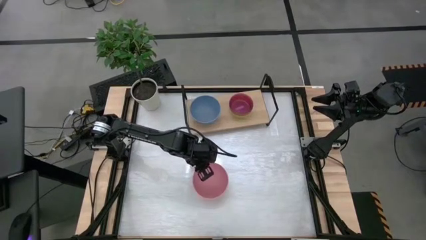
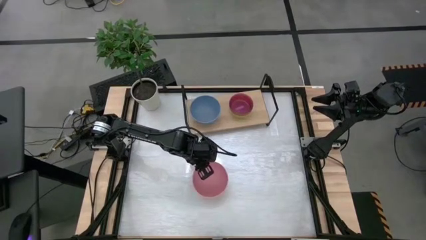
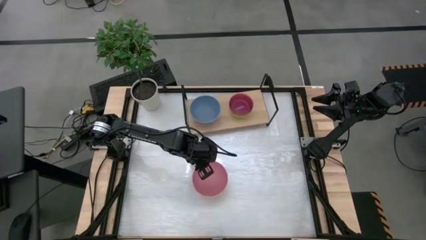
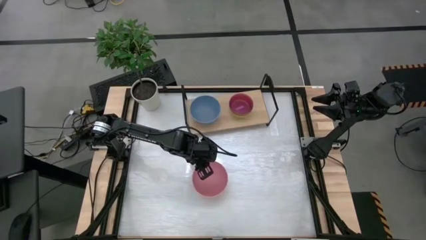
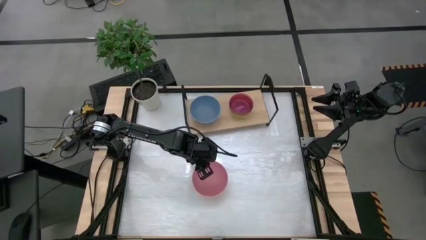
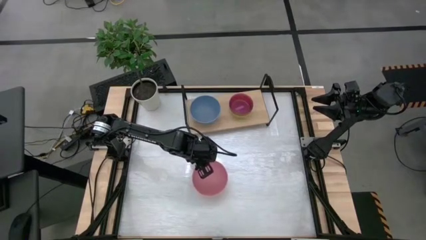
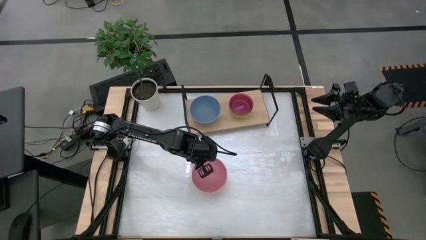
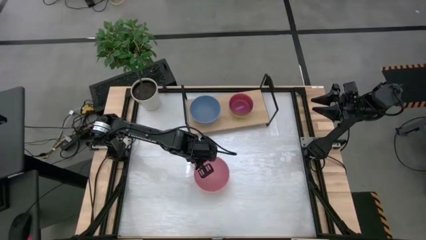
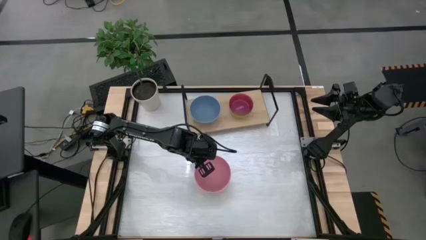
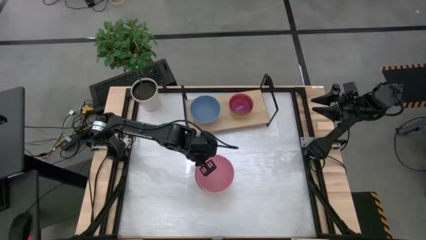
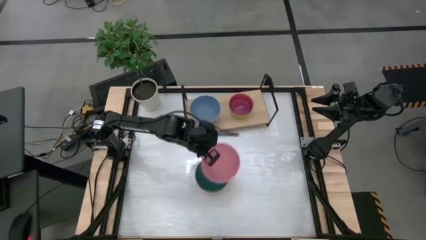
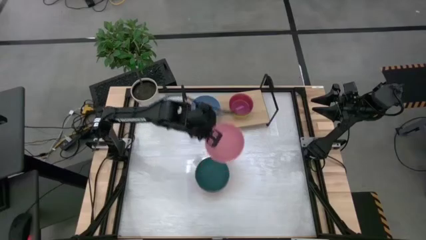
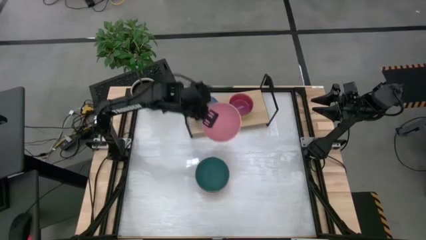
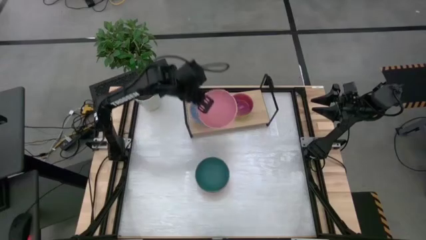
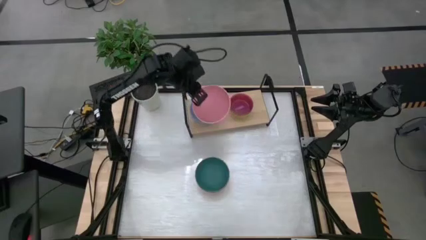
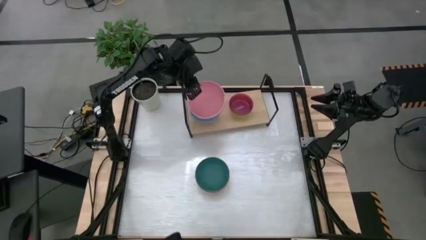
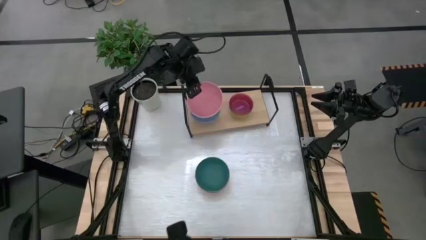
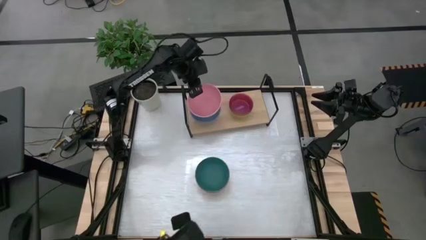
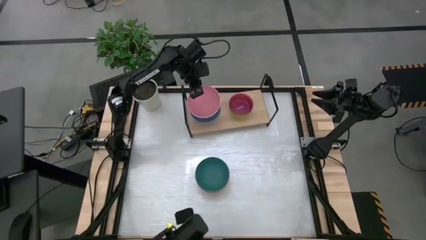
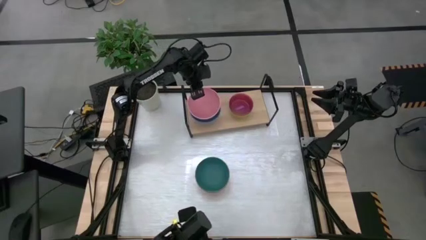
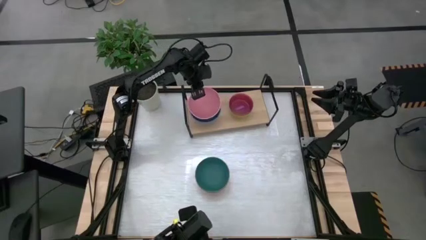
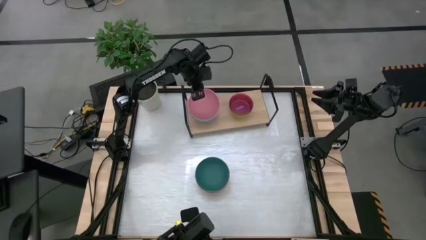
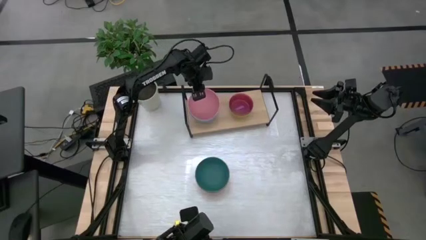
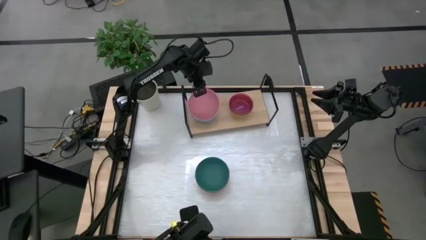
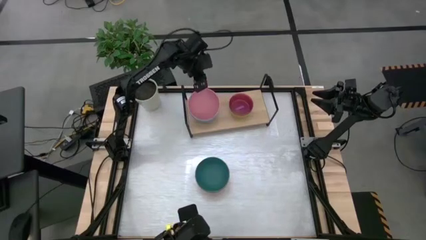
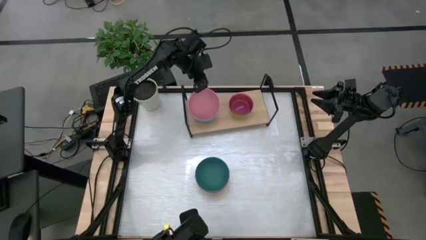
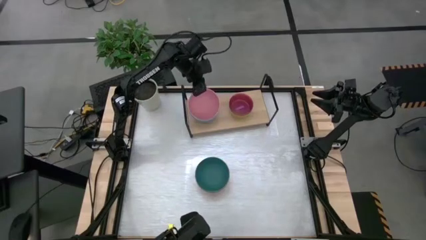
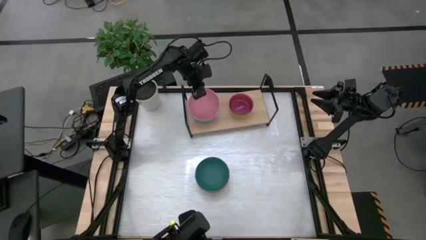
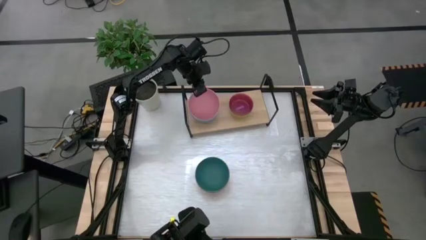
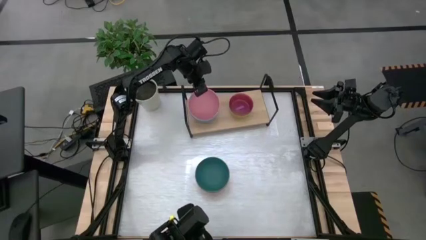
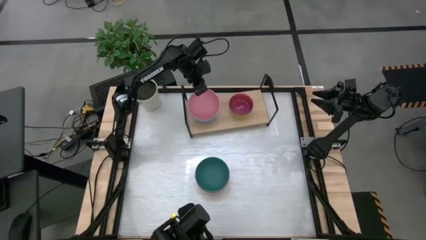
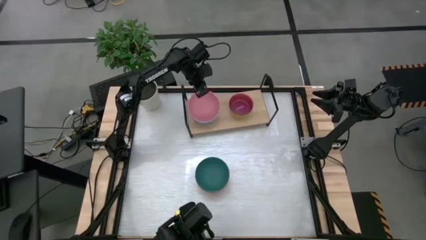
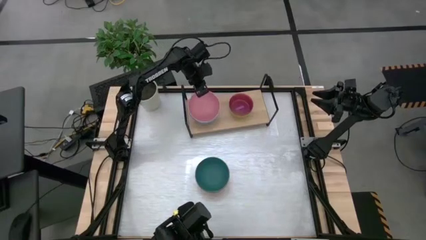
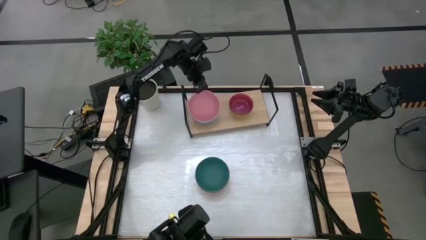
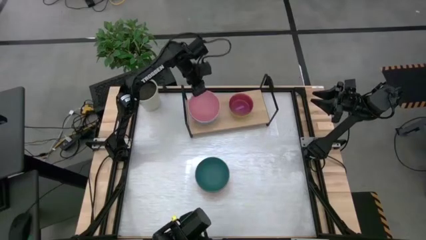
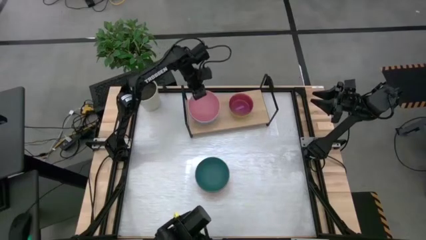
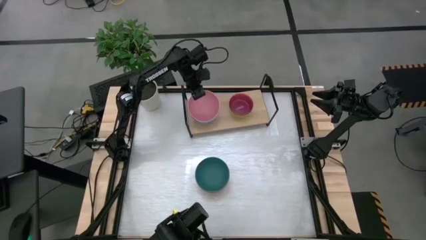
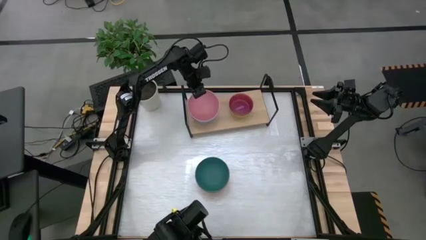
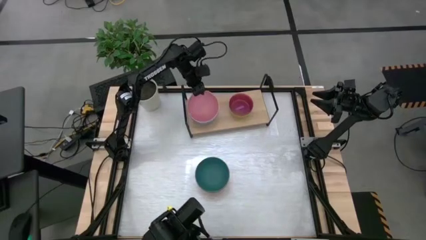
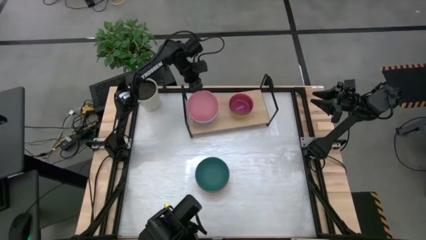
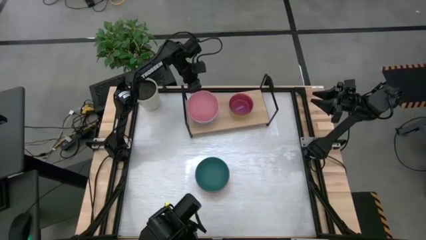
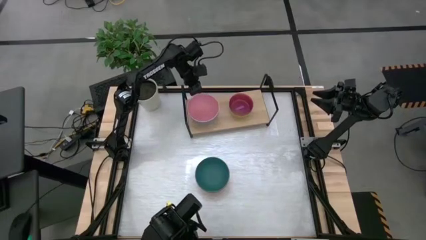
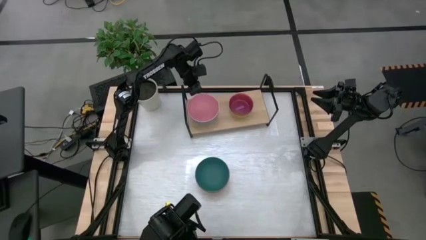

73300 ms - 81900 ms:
Task: Place and stack bowls onto a shelf
Stack the big pink bowl on top of the big blue bowl on the shelf

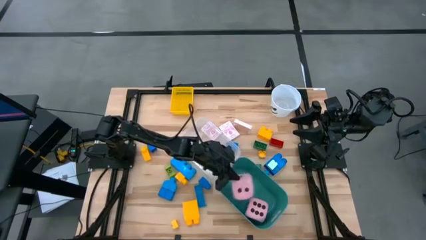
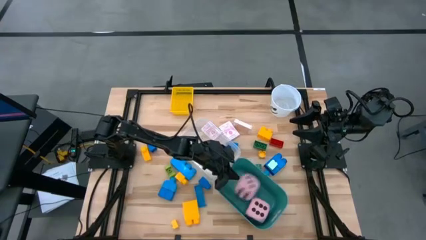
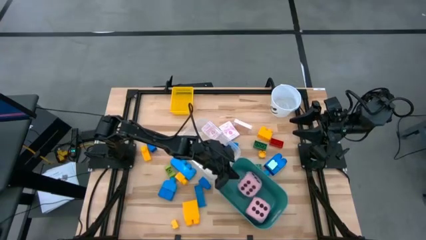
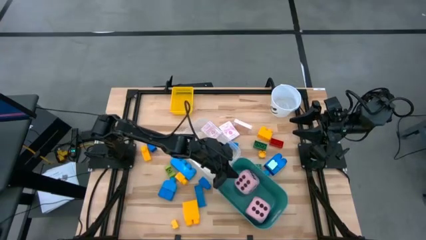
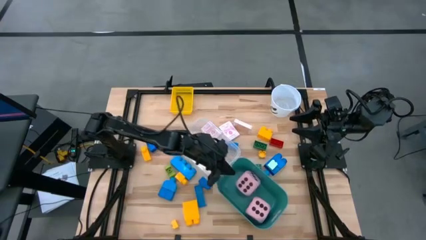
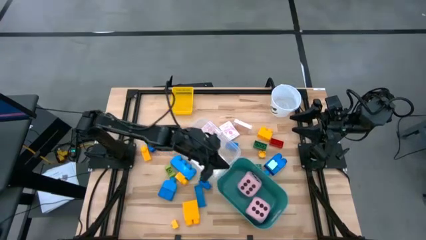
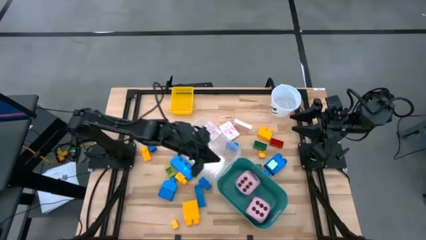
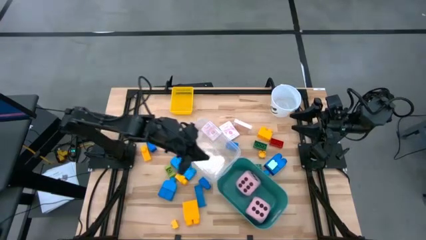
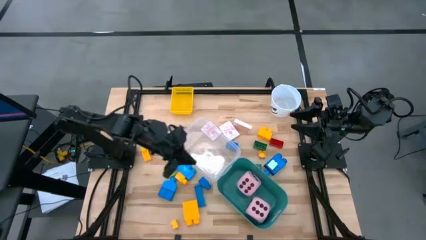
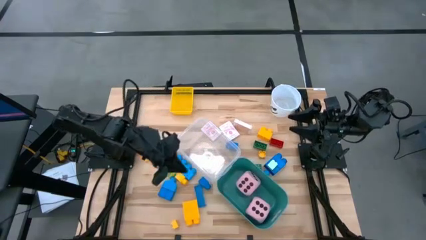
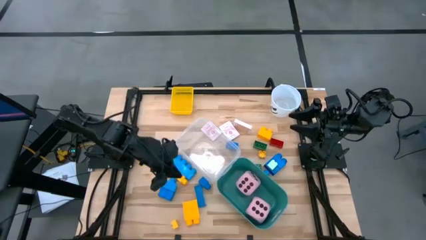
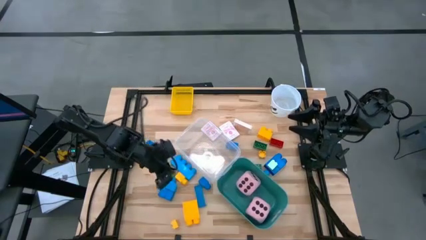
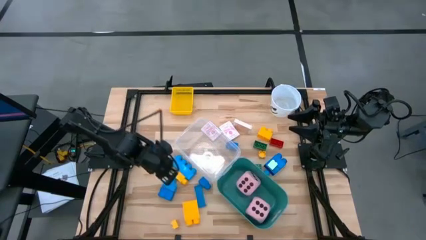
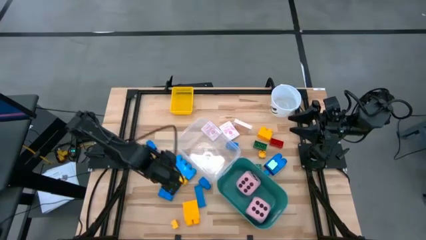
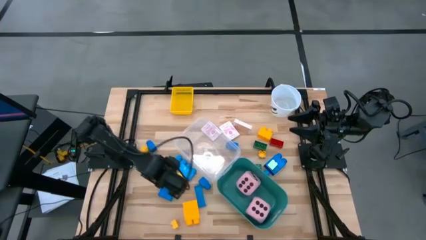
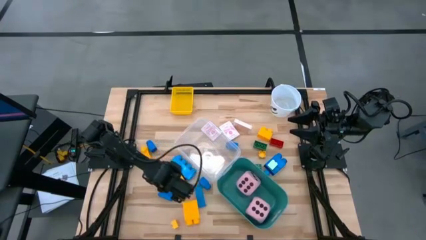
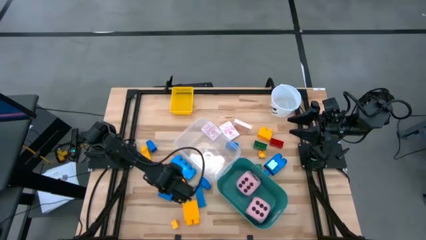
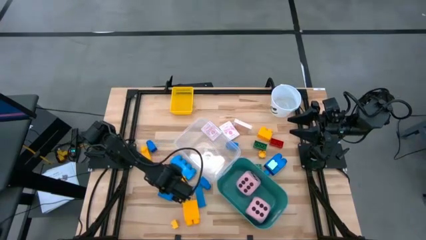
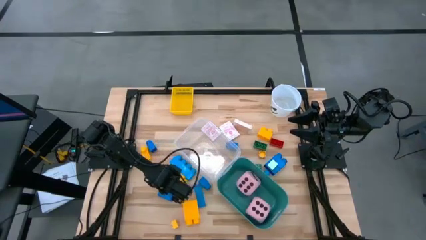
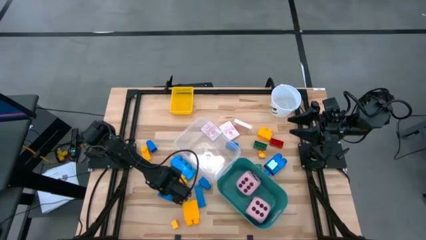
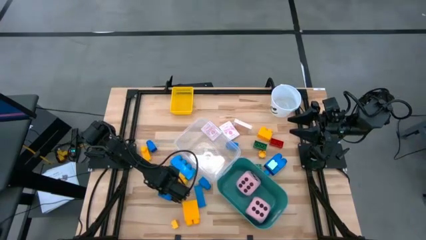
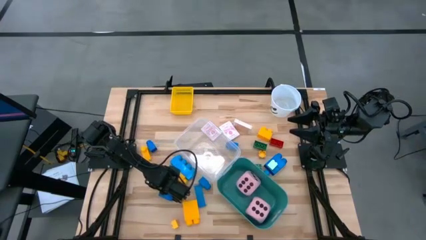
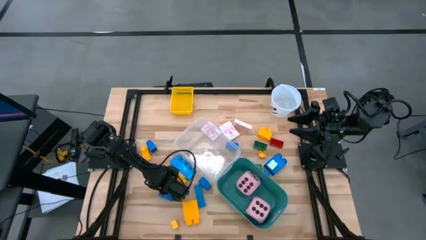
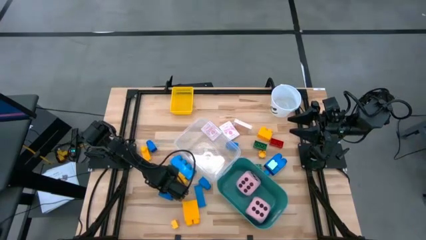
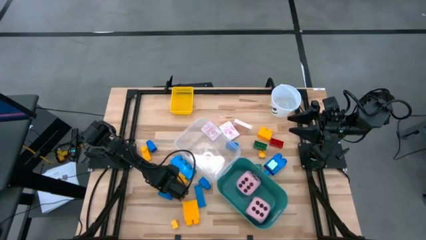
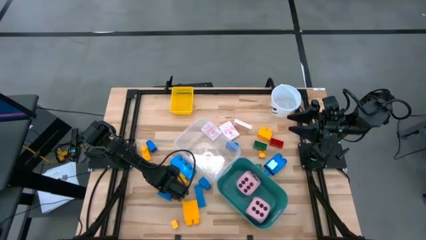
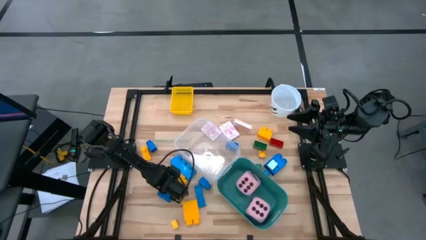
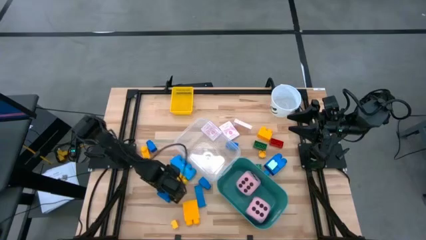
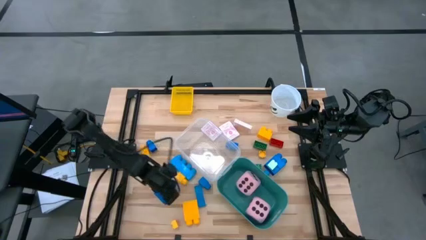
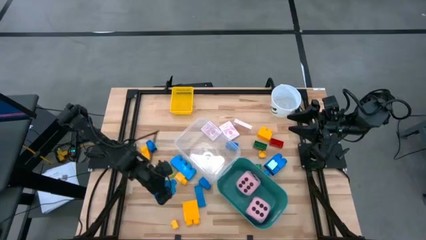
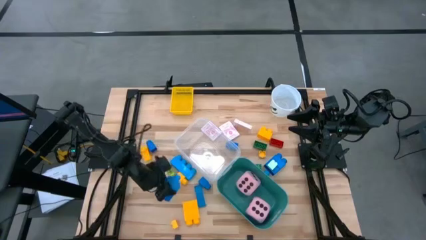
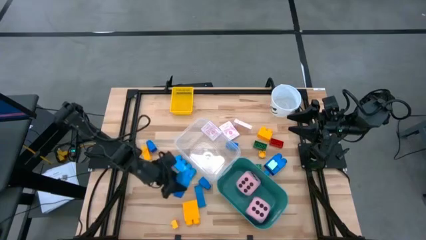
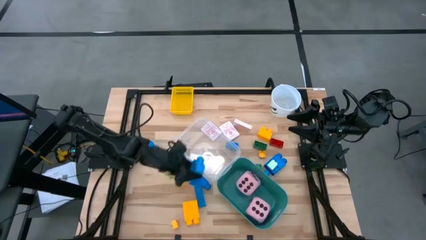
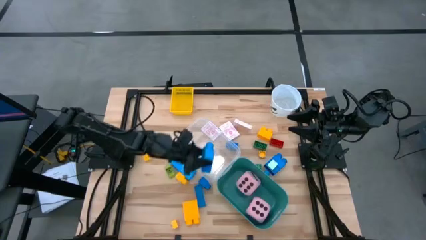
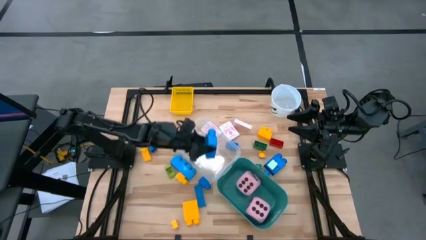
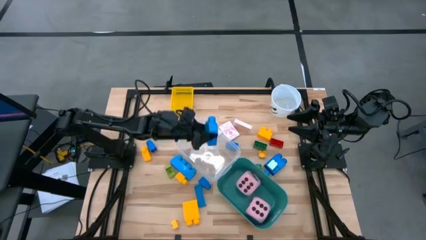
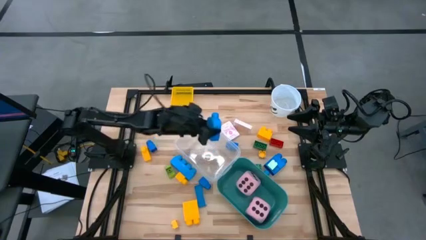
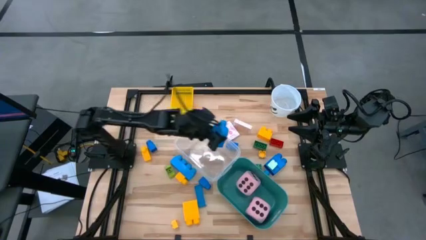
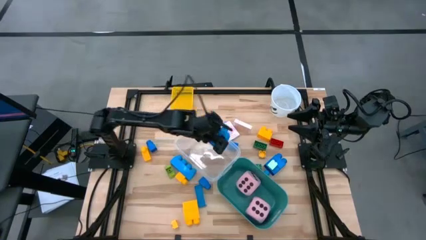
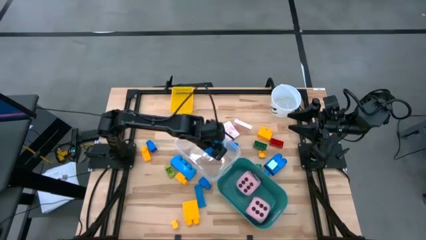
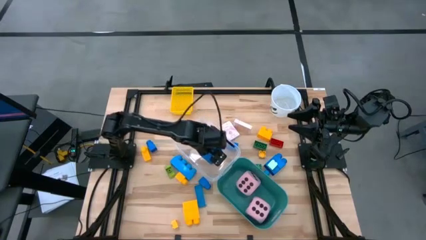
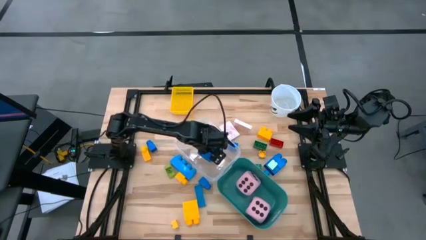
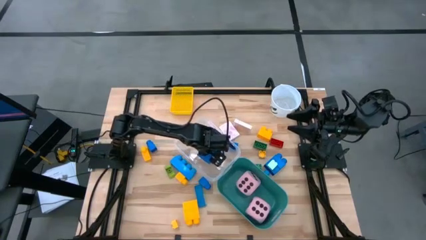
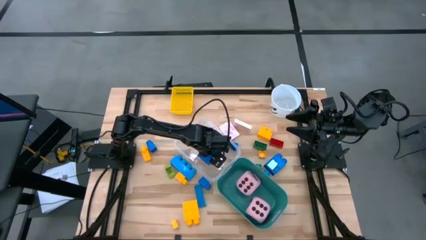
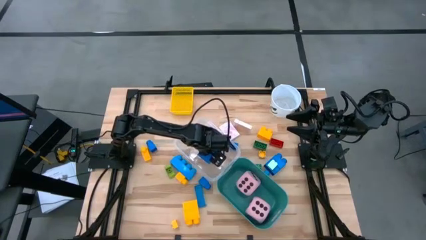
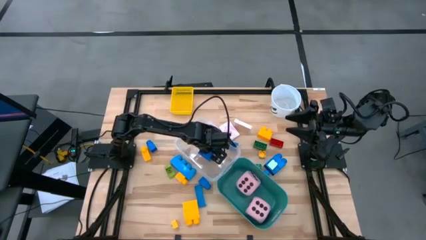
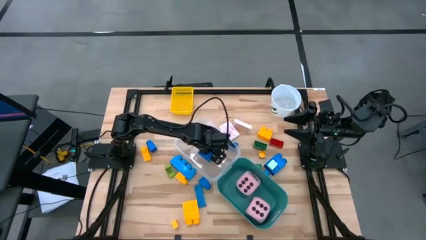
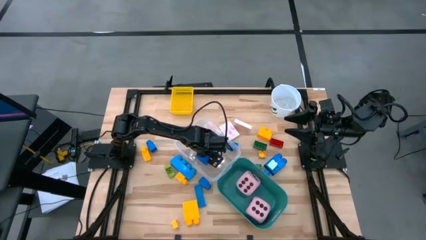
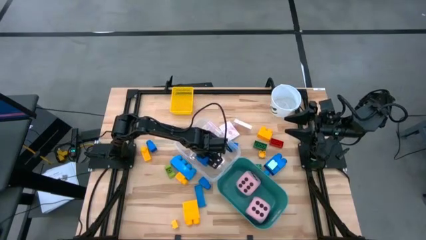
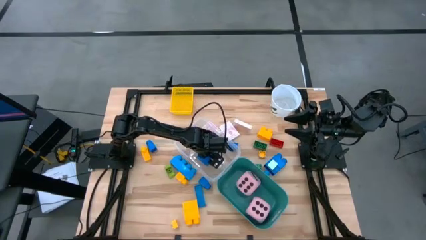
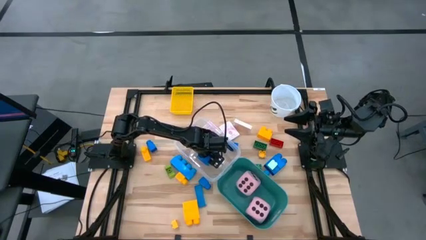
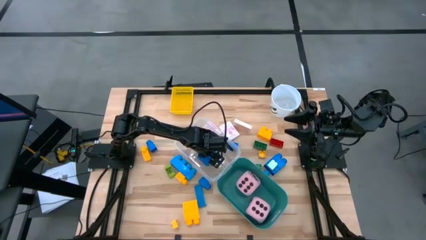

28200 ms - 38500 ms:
Task: Pick & Place Toys
Put the blue game pieces into the transparent bin
